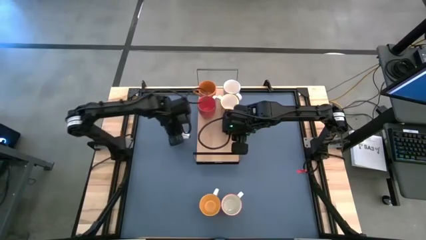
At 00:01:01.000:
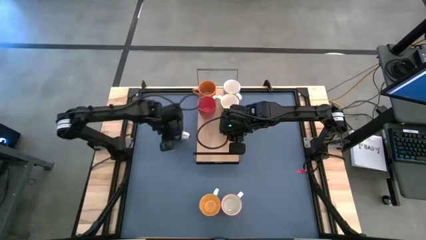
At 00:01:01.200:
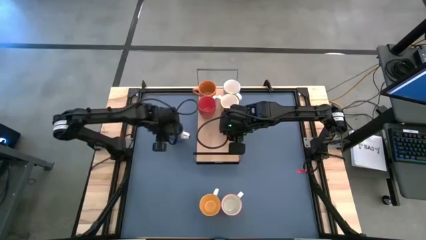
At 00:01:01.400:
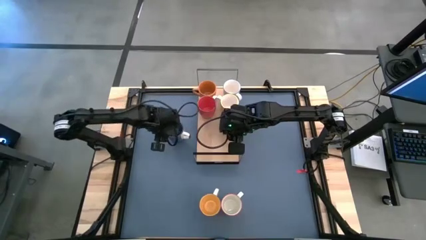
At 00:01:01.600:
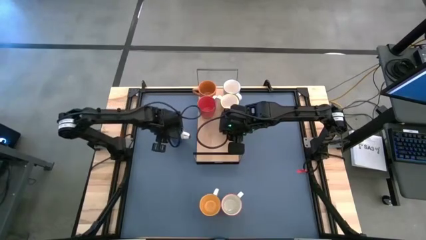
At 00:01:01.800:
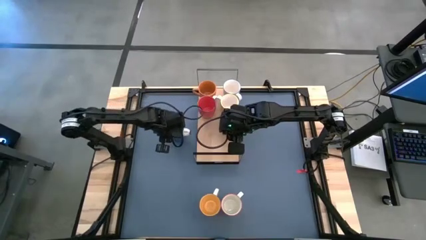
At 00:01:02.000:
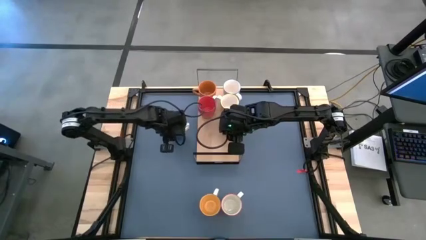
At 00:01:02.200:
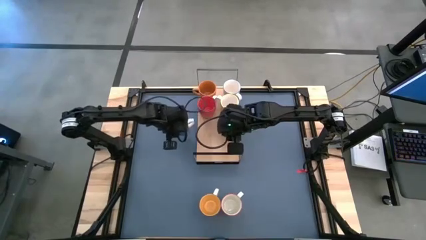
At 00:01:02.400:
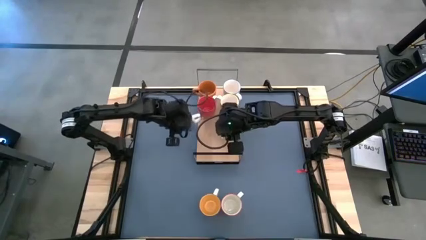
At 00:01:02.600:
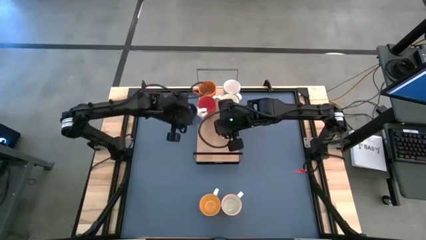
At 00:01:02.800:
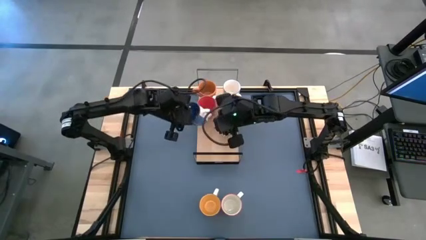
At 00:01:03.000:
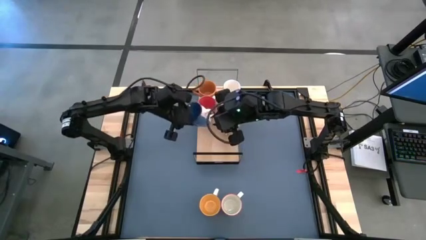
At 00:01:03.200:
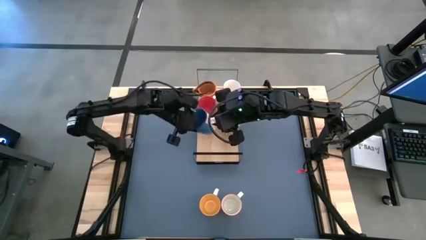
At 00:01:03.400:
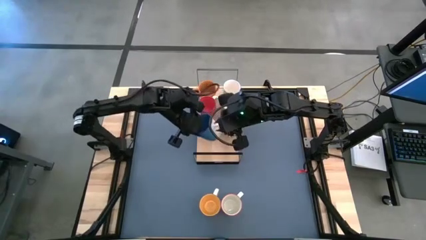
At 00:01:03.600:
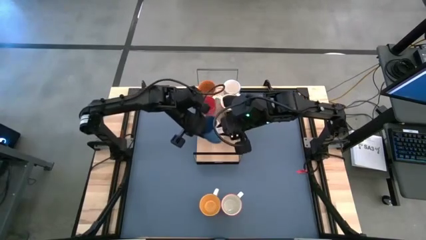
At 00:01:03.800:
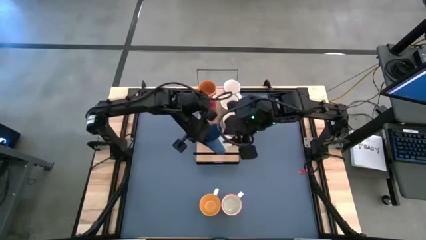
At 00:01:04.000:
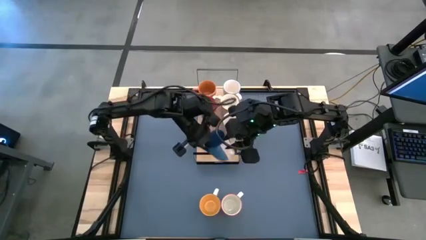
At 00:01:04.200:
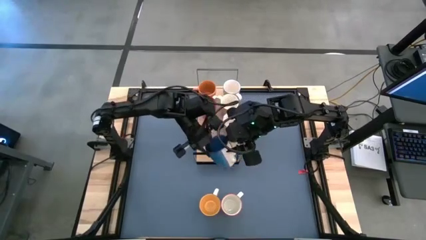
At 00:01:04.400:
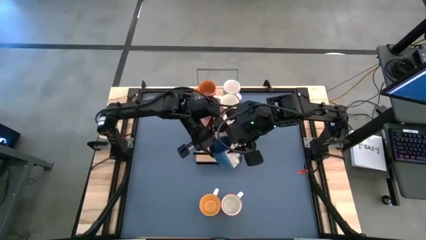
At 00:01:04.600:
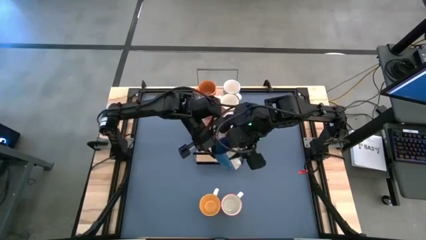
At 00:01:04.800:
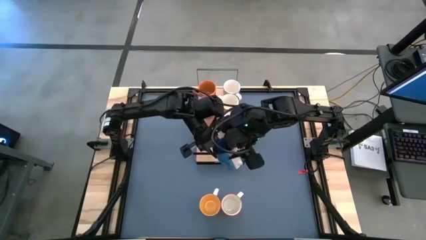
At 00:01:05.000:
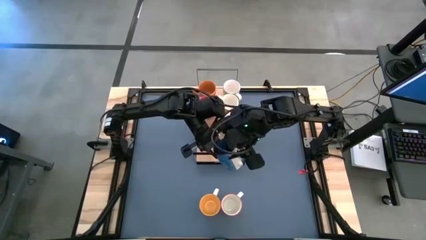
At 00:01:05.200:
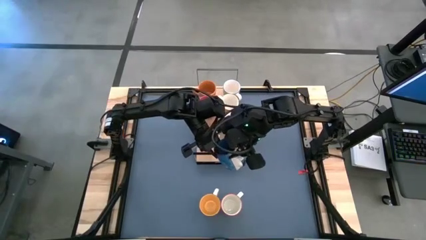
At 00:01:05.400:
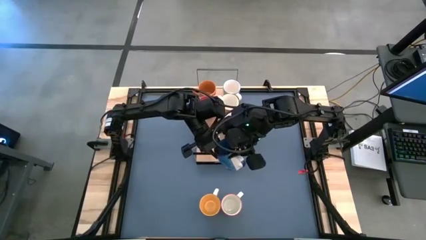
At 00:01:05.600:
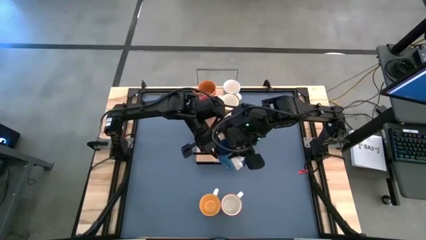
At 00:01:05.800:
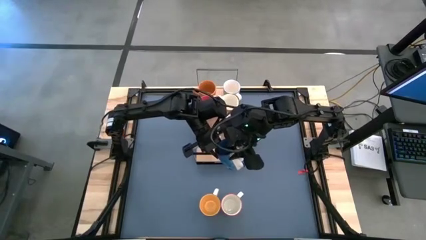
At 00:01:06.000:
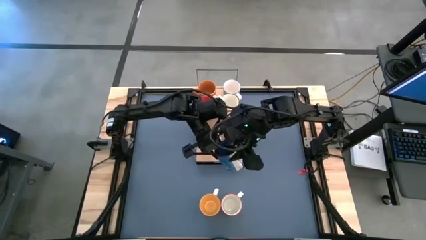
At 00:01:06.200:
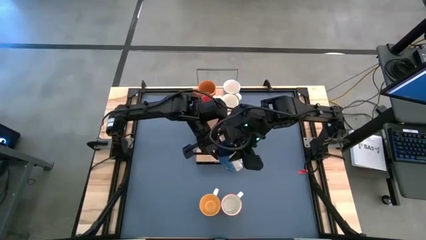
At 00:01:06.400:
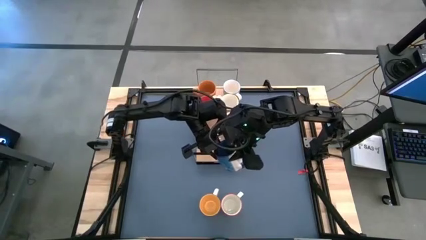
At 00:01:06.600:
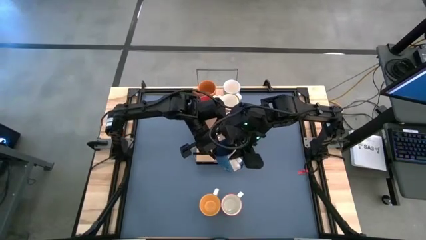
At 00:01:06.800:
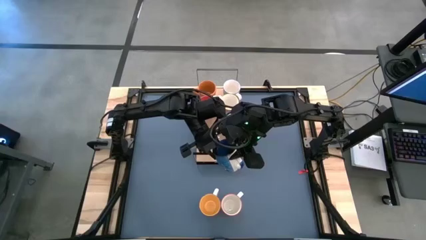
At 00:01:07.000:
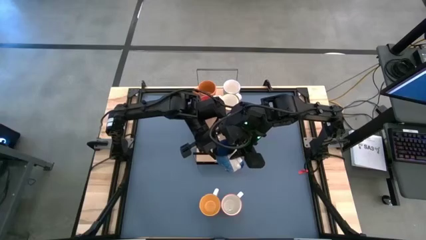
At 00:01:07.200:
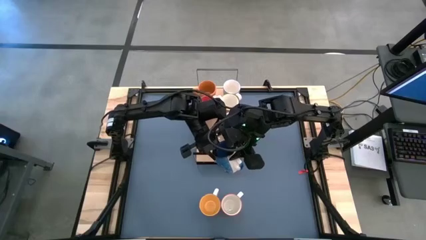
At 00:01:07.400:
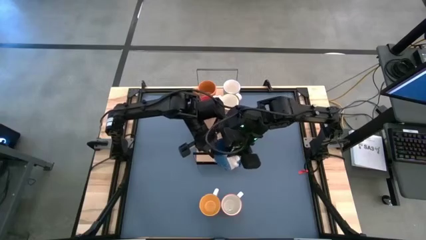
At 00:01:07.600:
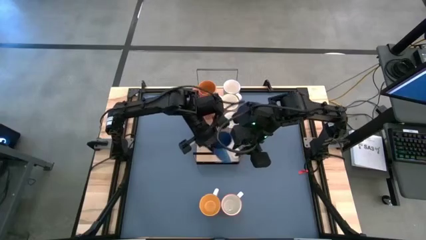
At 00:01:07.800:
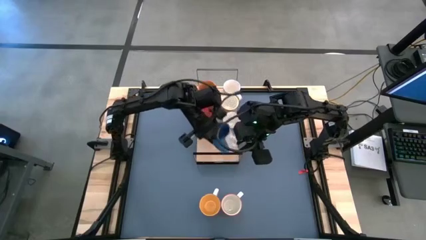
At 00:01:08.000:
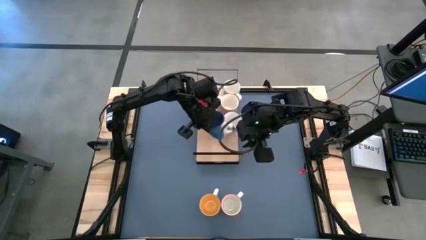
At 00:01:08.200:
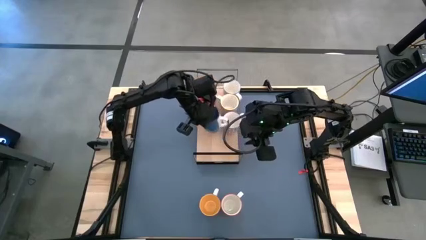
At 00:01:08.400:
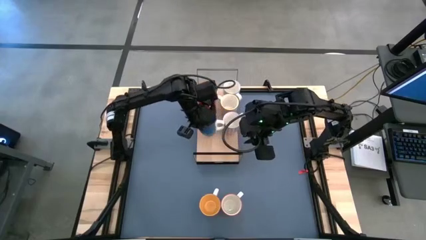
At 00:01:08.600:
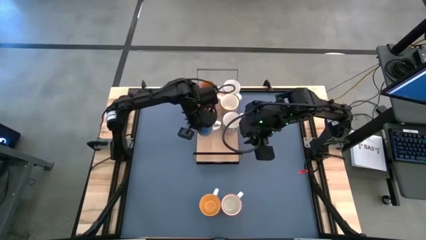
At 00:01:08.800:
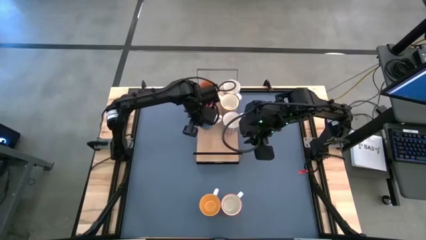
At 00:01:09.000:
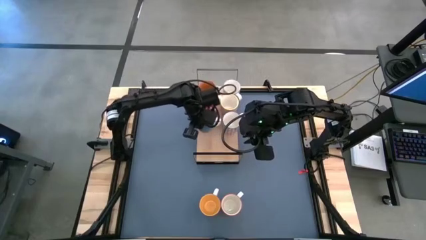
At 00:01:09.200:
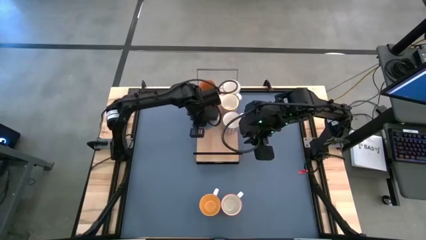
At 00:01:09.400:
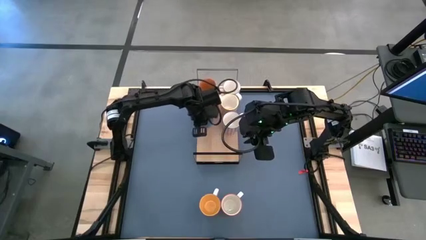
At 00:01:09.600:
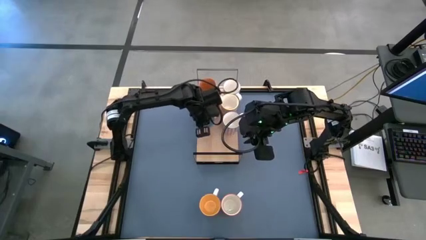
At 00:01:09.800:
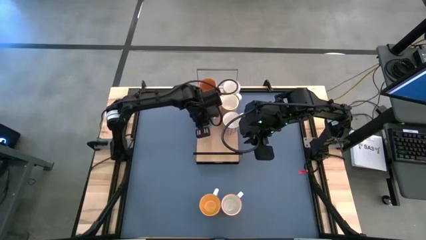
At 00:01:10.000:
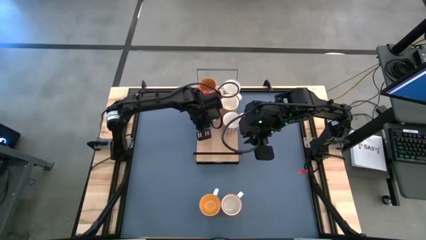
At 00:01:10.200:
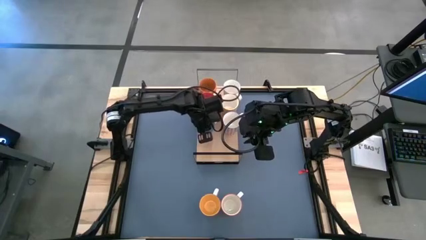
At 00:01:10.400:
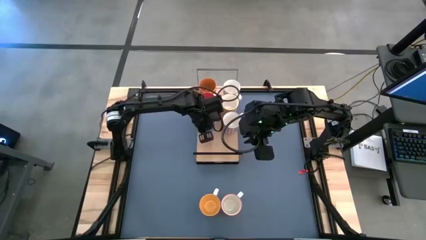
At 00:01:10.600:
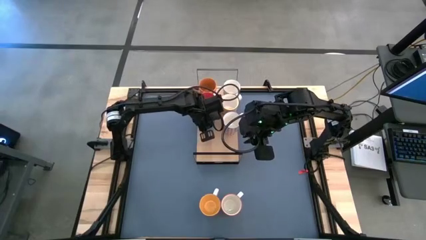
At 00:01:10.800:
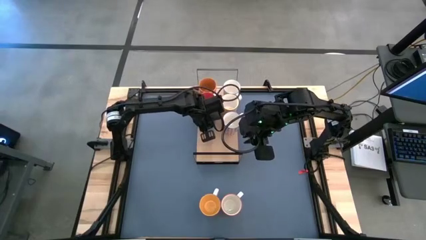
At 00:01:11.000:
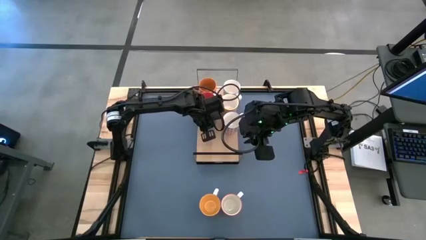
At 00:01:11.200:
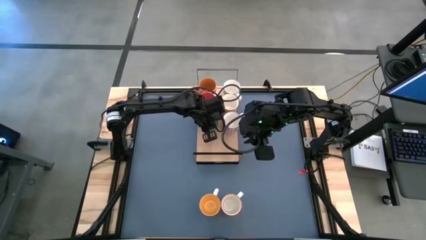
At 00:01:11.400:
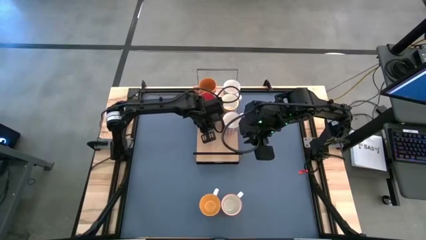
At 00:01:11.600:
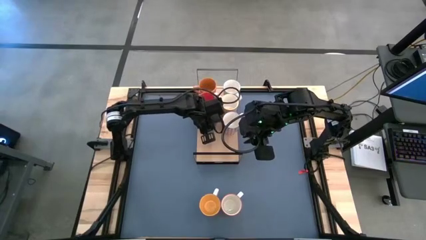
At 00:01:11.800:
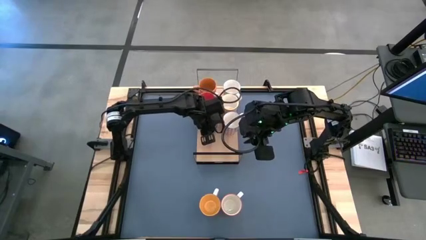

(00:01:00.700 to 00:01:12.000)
Task: Place coffee mugs
Put the blue mug on the shelf

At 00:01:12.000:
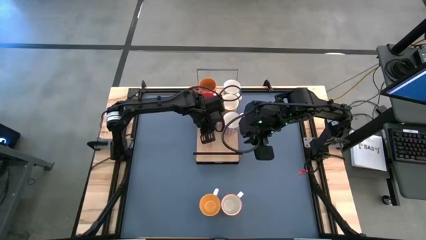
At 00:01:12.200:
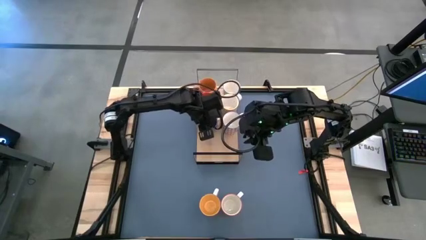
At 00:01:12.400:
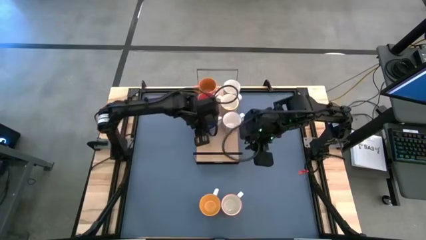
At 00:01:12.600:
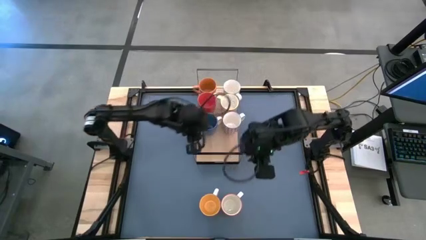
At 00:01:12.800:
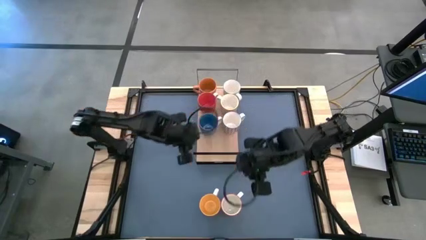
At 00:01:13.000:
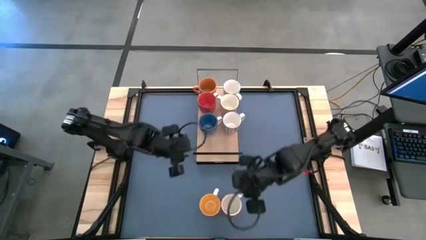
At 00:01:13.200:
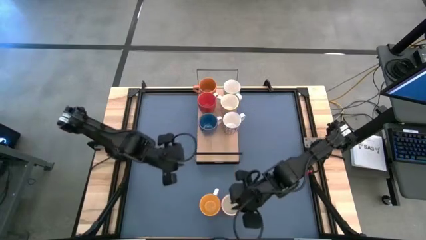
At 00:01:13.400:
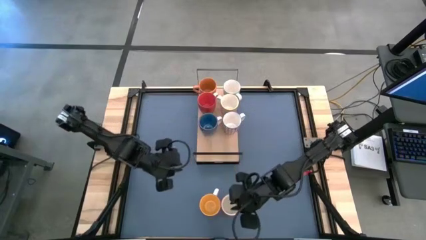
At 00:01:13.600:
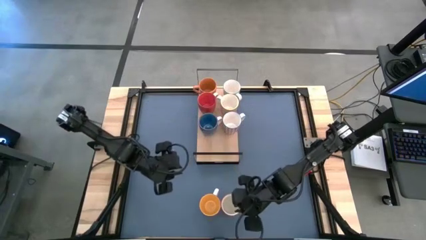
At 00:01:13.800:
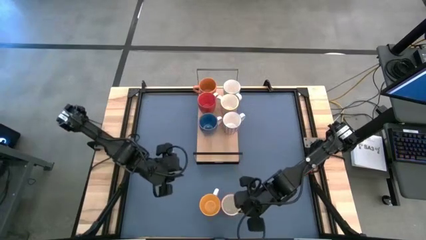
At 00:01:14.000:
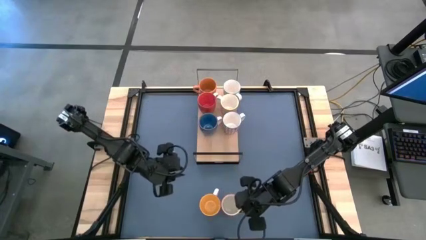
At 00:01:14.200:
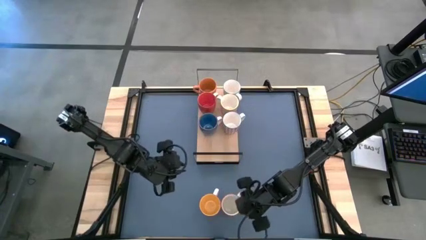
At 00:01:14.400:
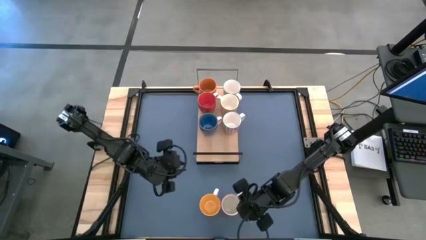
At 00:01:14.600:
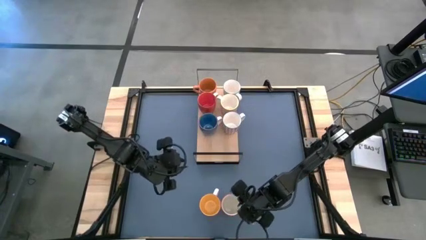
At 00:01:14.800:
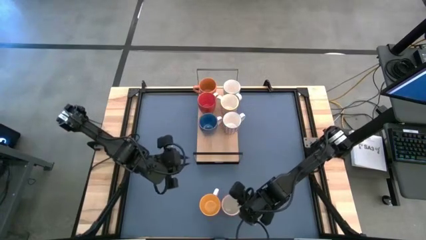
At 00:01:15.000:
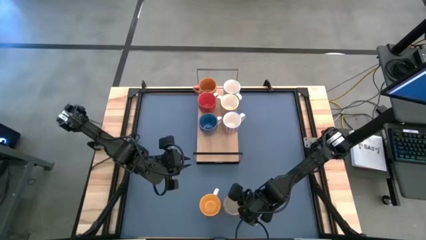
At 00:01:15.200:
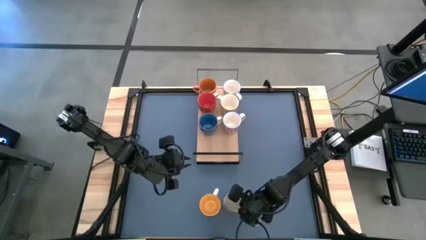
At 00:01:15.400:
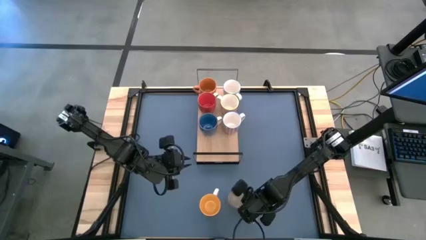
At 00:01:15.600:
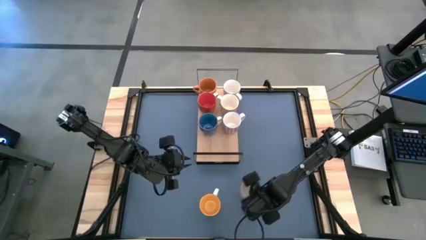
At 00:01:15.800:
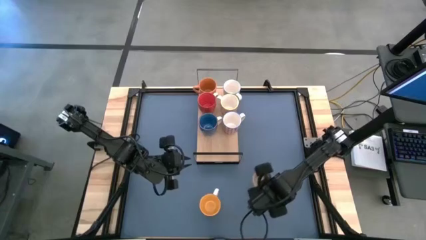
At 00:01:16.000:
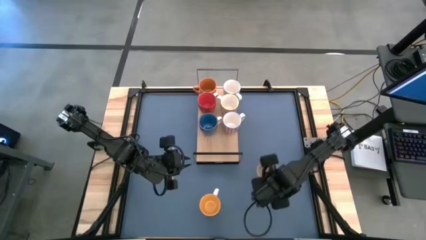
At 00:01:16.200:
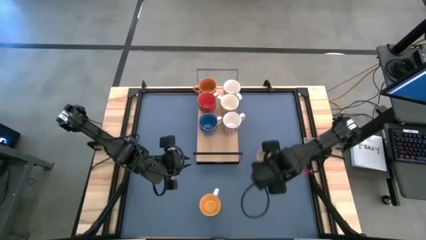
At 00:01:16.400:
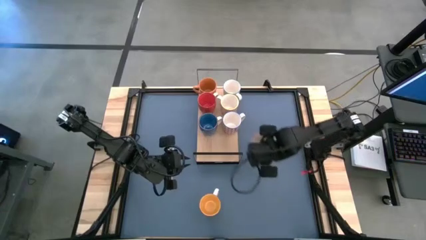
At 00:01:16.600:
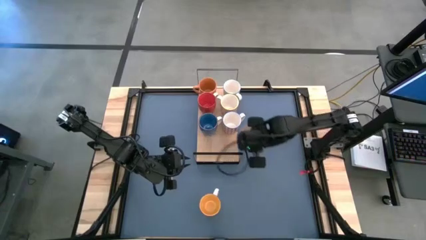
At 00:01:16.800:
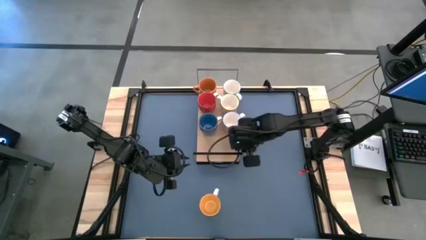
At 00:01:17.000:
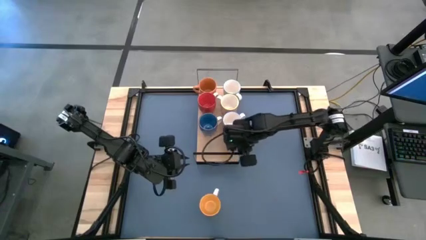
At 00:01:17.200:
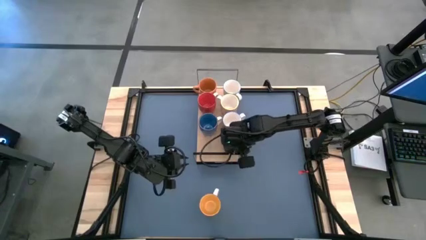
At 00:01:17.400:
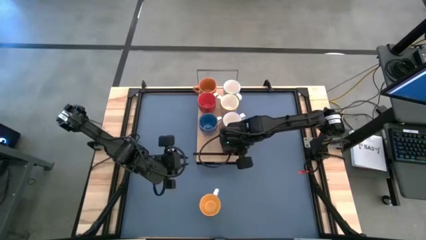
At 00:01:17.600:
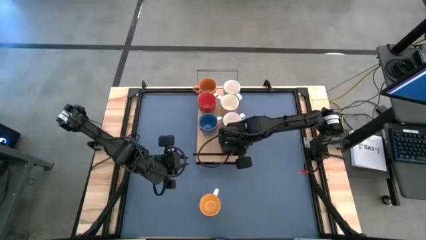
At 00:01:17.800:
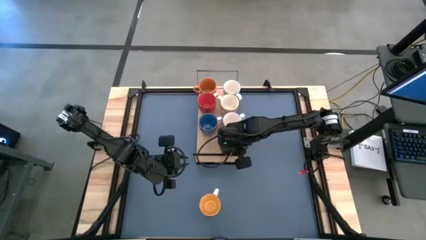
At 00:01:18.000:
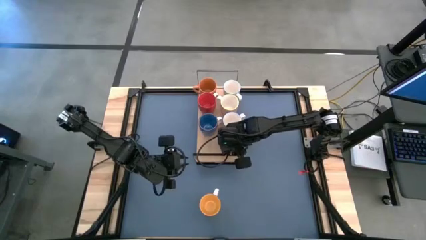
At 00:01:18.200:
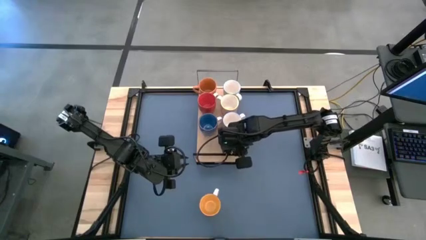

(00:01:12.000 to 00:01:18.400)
Put the gray patterned mug on the shelf
